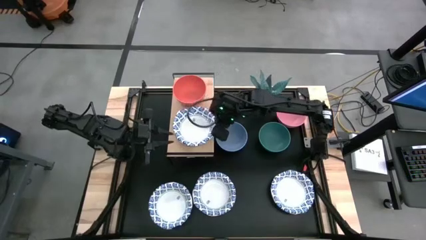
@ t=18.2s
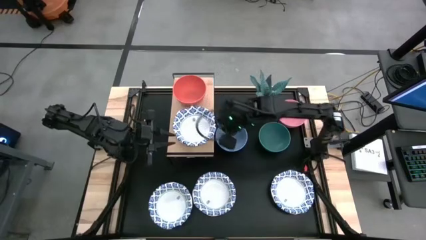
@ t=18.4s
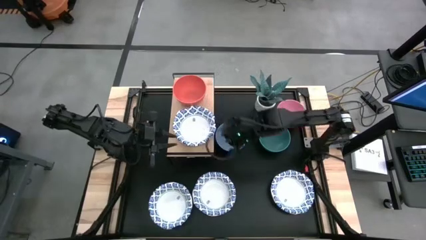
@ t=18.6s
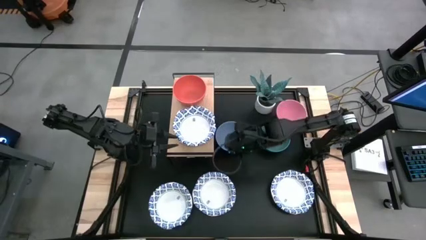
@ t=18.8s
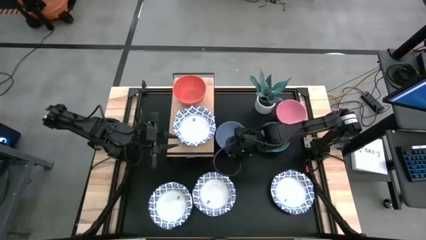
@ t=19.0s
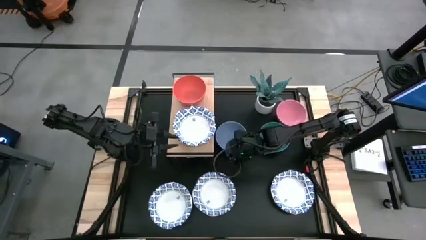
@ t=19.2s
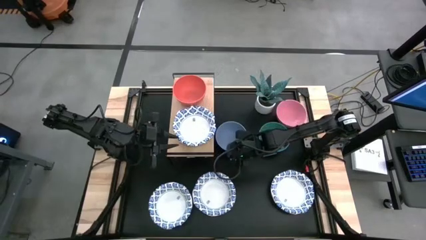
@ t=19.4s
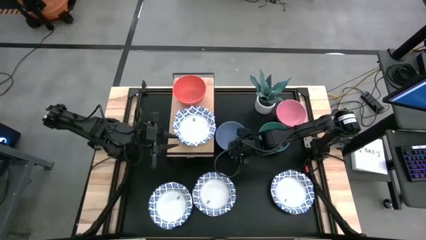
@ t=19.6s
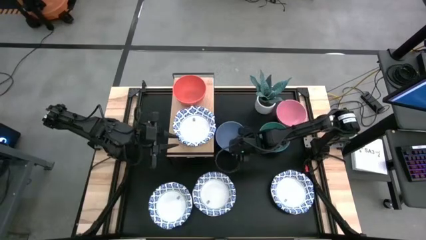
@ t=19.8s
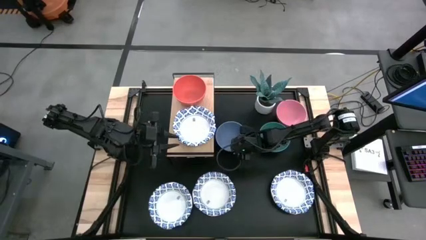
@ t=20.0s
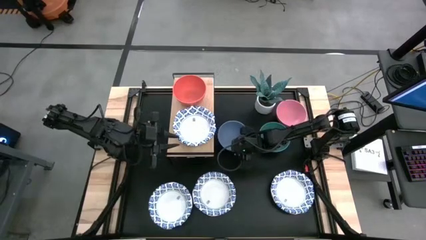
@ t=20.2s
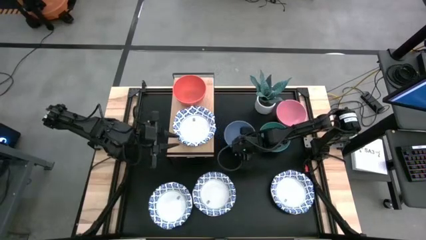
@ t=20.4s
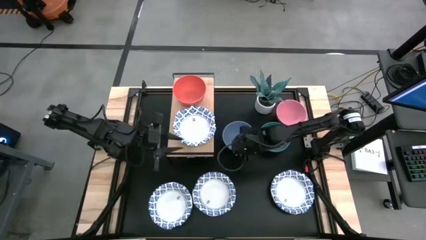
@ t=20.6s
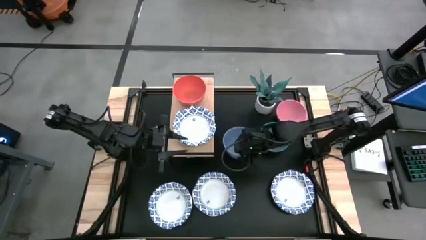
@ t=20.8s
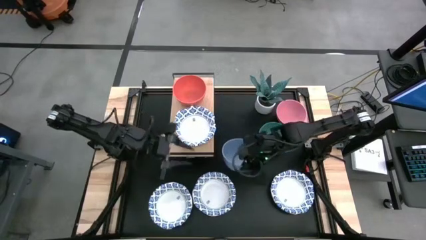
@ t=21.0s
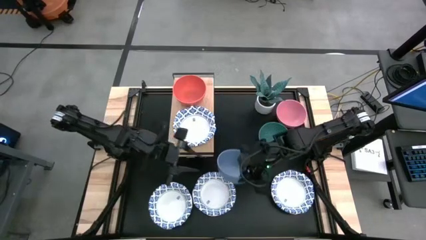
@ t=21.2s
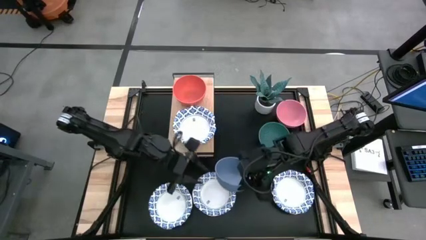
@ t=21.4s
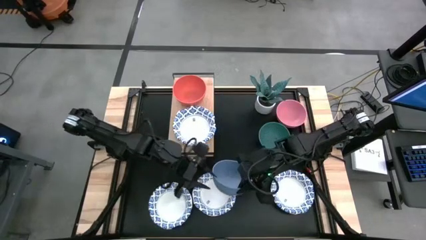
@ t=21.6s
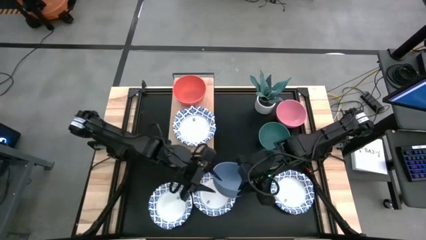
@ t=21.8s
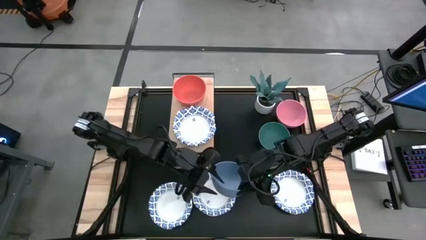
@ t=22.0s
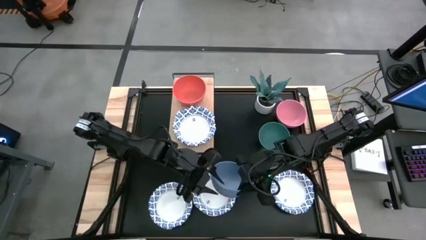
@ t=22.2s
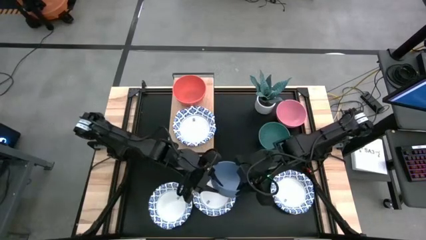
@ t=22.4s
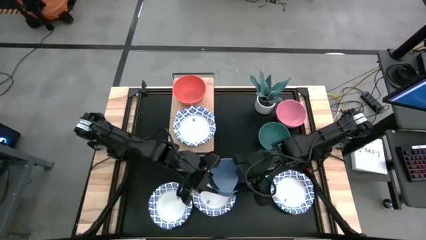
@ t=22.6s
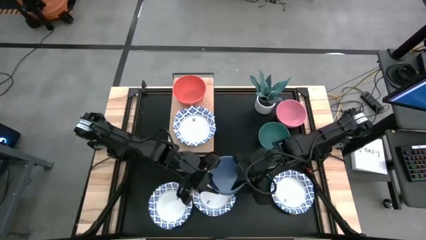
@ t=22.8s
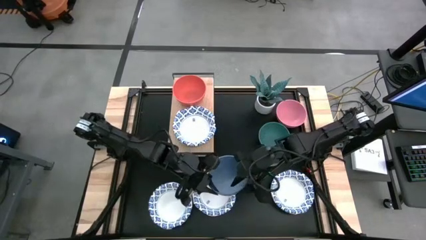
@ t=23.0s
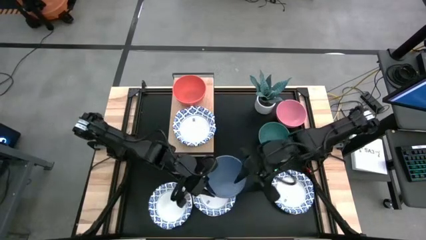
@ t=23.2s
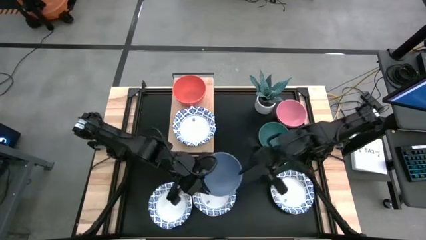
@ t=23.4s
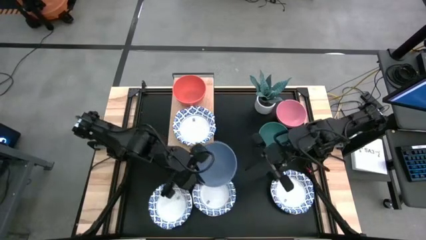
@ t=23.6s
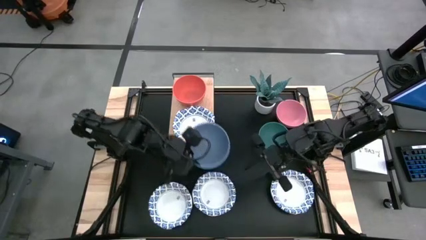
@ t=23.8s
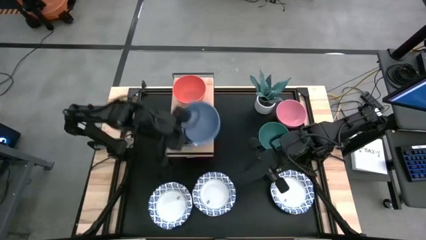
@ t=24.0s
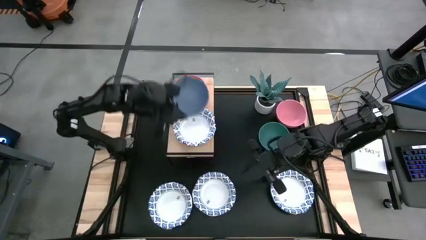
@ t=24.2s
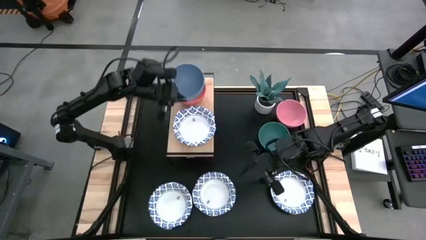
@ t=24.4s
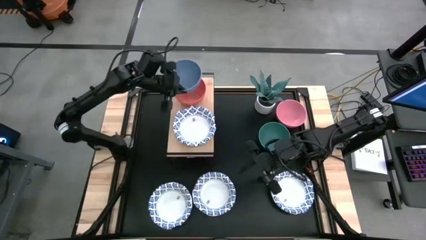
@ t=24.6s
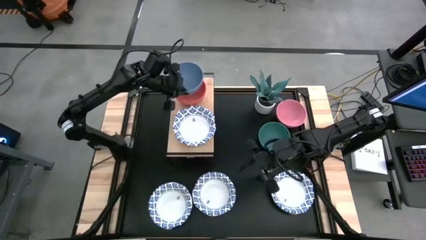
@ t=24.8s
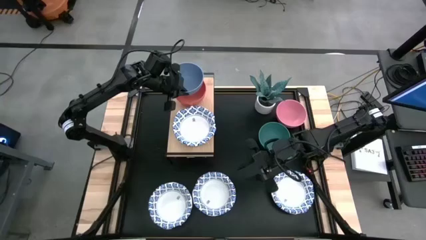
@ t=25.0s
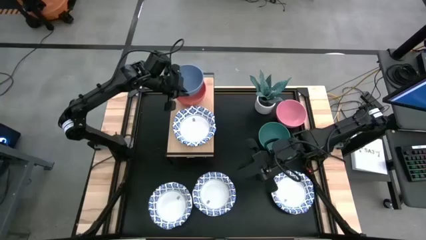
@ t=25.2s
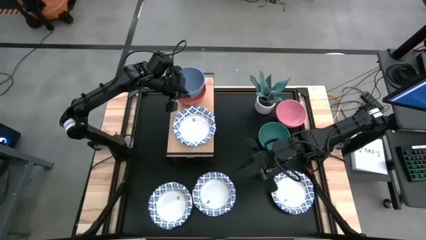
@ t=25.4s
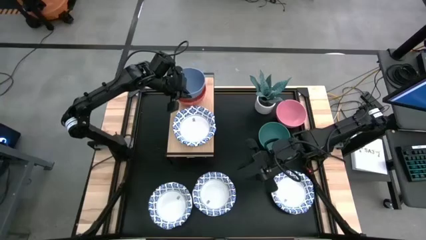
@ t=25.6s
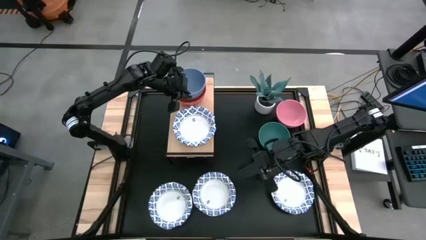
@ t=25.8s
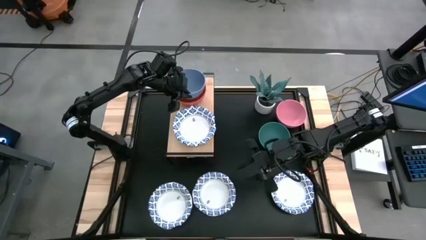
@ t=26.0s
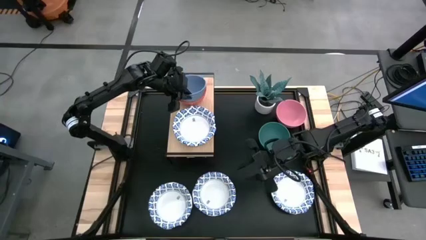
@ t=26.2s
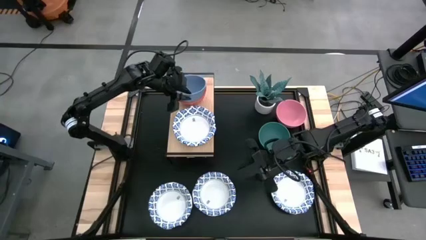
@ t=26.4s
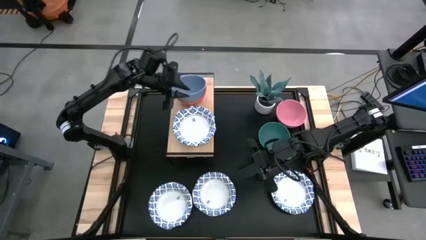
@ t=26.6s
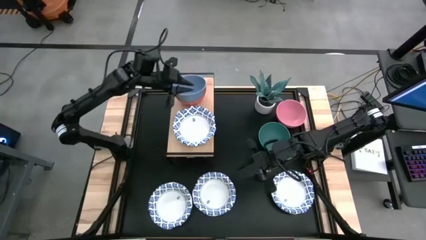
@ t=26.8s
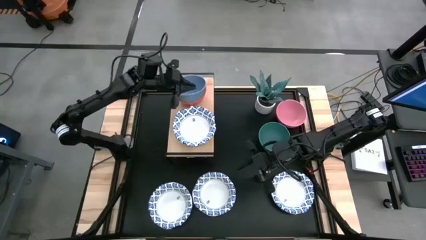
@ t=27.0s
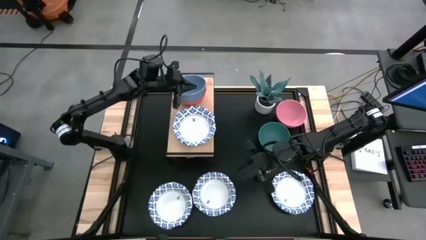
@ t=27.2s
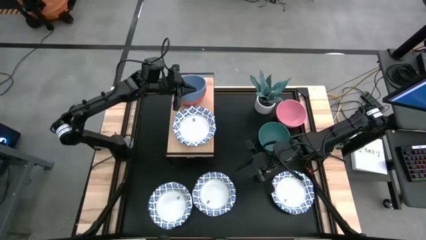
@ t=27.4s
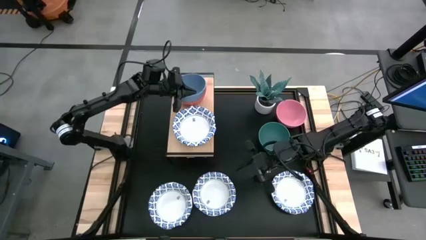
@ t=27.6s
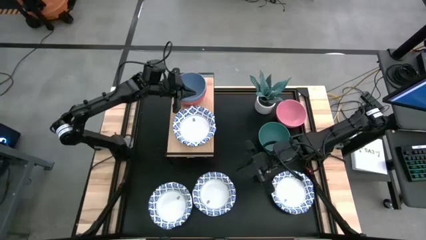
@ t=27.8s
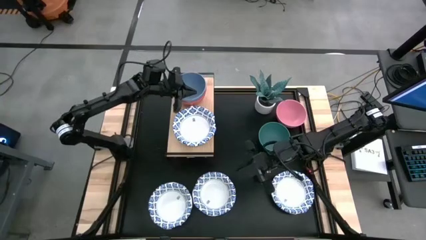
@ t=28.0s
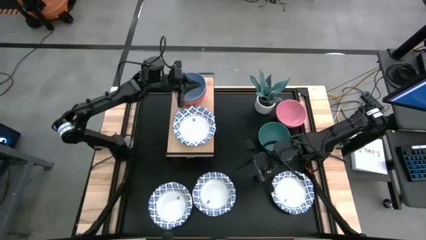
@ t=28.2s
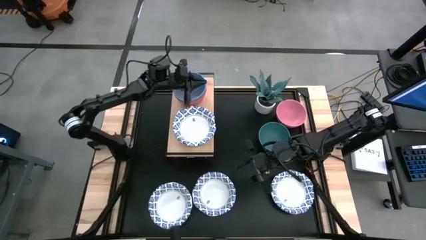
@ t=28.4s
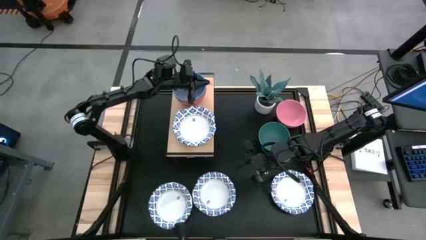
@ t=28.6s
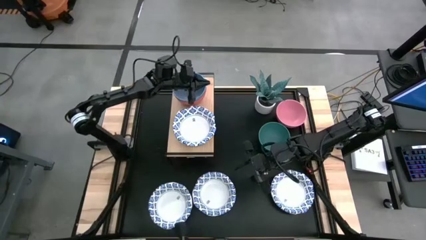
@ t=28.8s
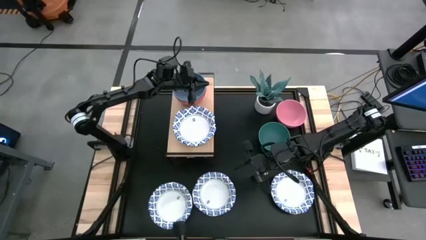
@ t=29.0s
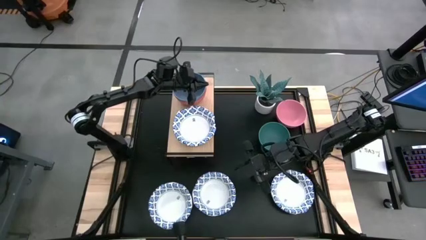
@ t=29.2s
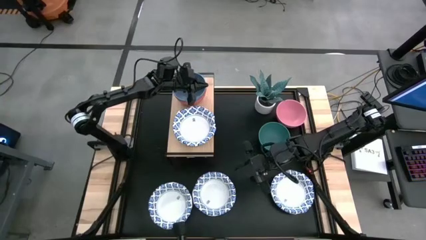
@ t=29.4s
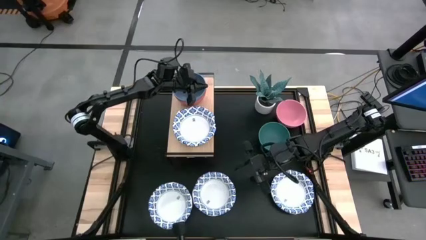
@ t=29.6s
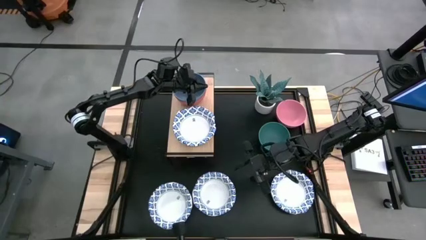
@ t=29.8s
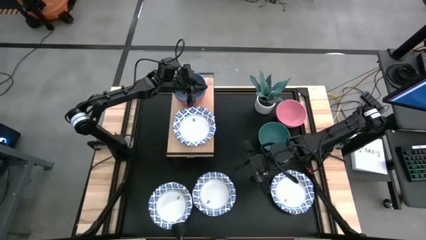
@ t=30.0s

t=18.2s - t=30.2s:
Task: Place and stack bowls onto a shelf
Stack the blue bowl on the orange bowl on the shelf

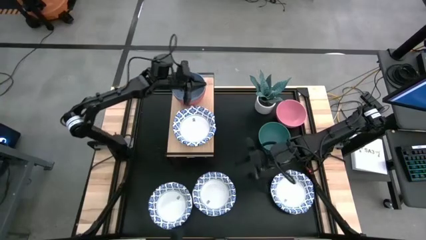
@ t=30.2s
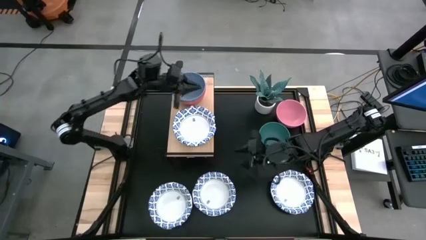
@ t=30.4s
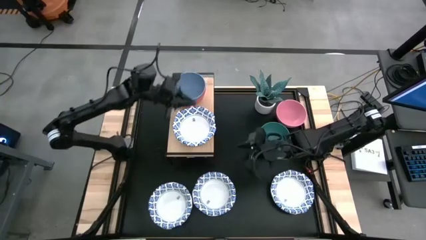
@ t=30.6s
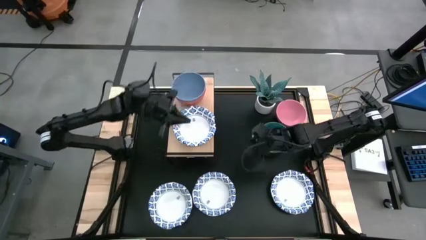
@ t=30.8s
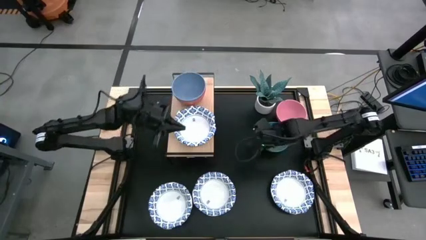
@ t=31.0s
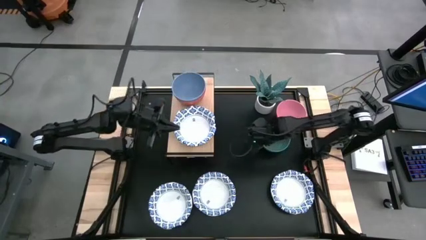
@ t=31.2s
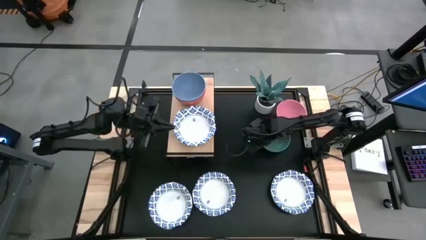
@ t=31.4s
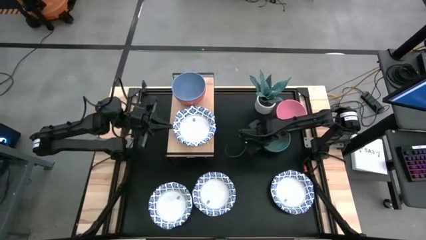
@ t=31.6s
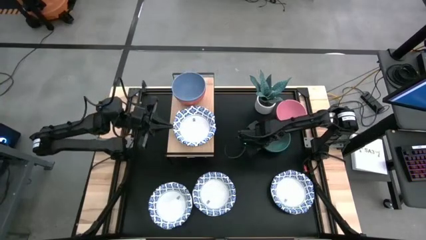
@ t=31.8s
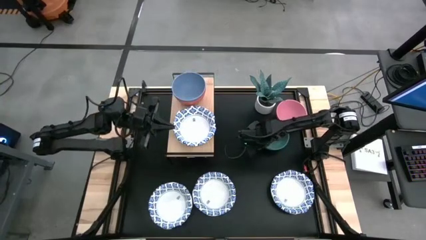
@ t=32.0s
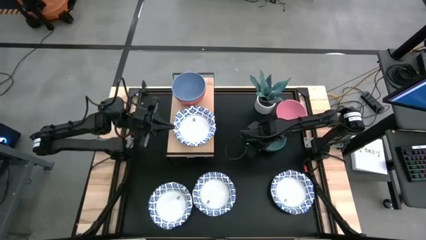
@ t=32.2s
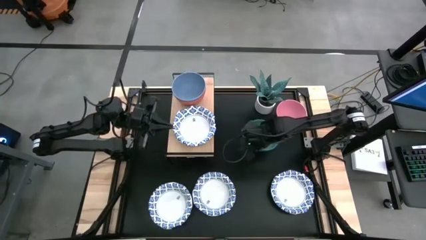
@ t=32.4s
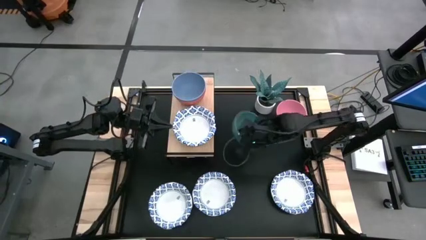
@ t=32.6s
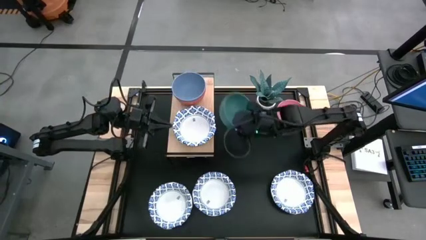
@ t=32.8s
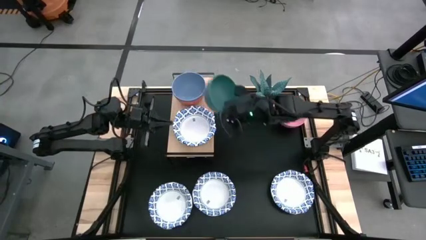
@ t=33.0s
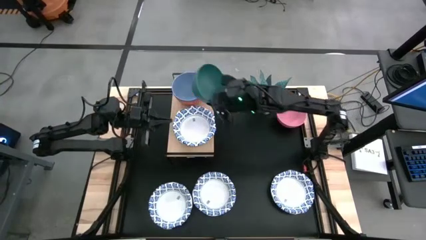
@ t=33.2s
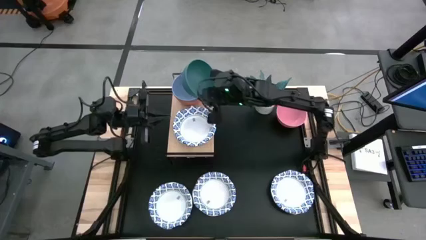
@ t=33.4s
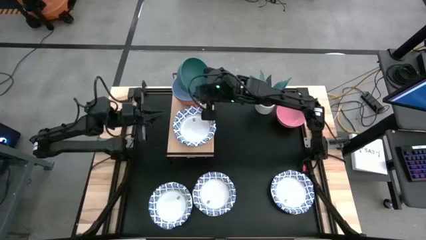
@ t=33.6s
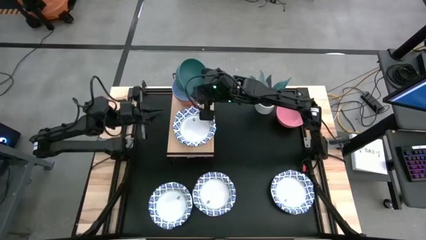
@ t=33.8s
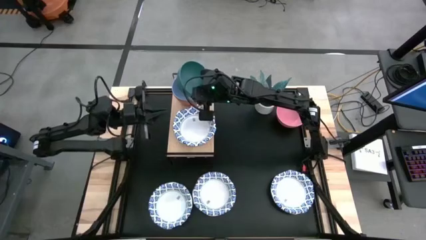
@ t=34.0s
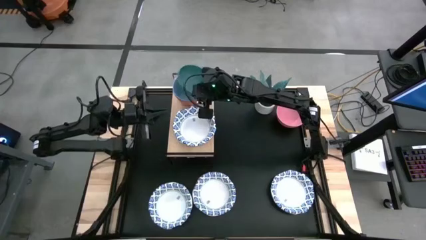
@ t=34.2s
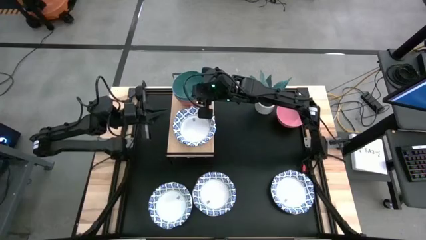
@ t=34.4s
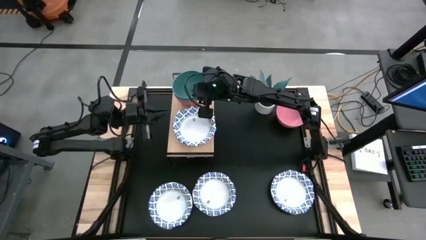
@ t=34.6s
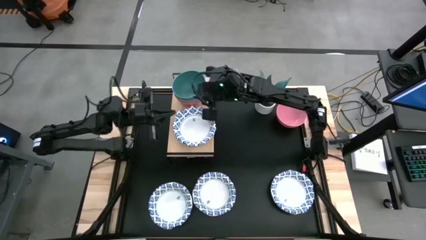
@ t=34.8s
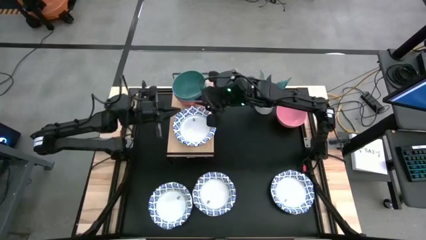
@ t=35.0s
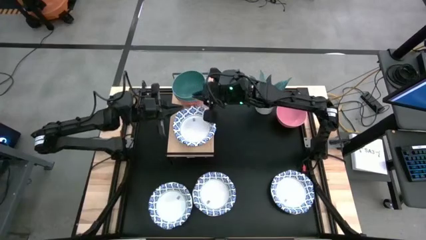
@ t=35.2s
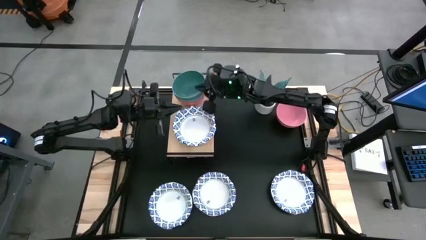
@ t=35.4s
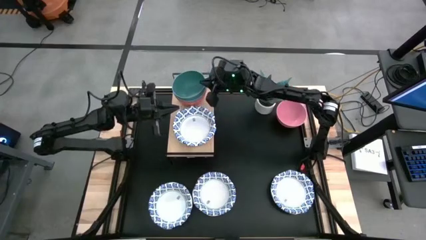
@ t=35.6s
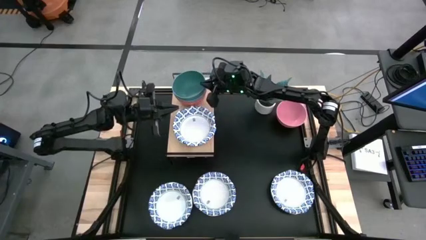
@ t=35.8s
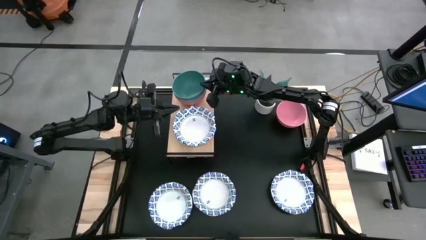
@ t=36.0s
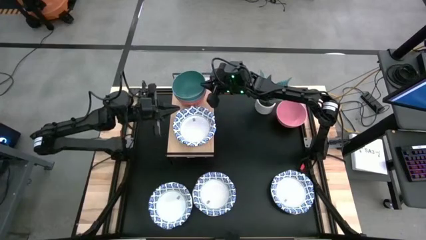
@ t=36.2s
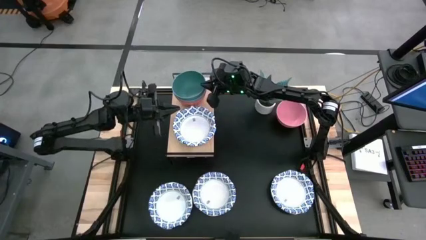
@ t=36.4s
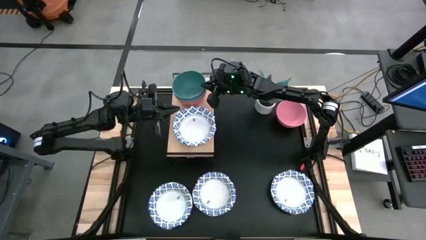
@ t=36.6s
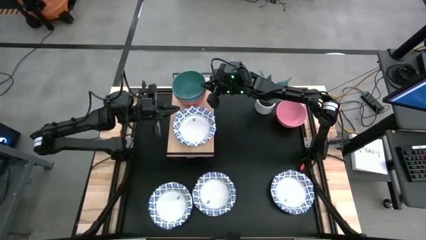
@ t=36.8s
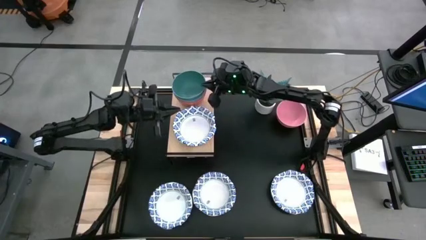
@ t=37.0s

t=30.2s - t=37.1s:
Stack the green bowl on the blue bowl on the shelf
